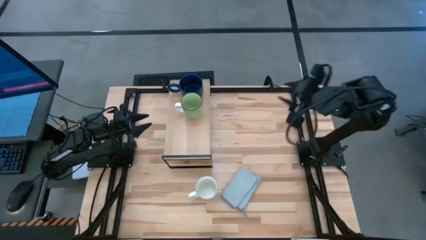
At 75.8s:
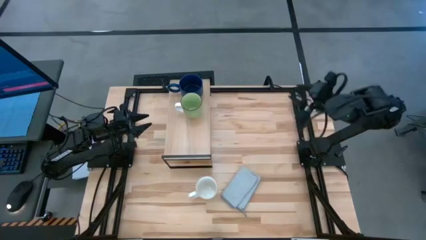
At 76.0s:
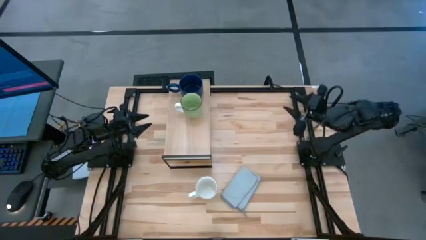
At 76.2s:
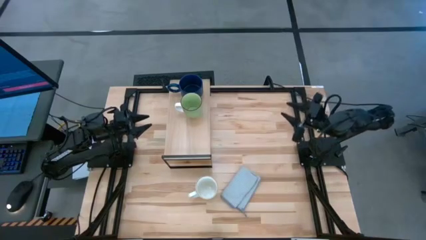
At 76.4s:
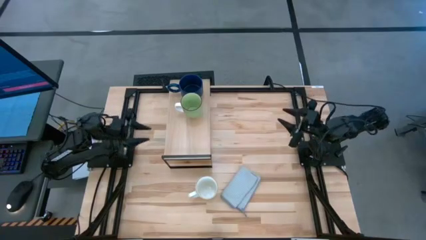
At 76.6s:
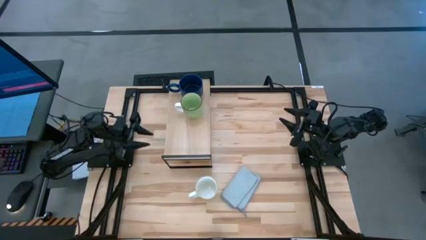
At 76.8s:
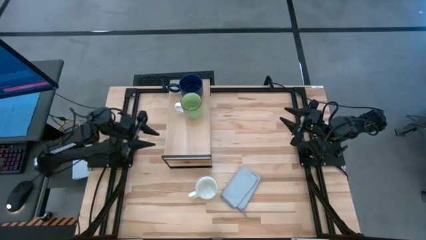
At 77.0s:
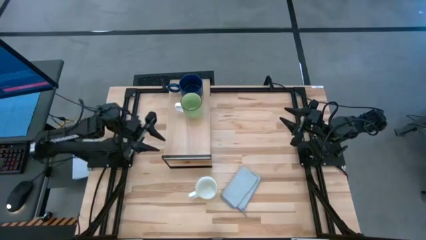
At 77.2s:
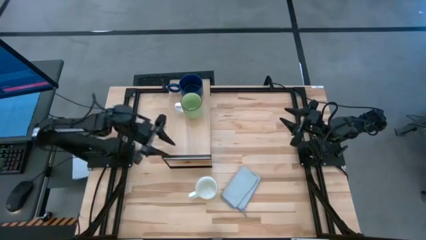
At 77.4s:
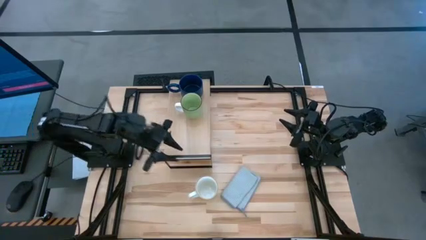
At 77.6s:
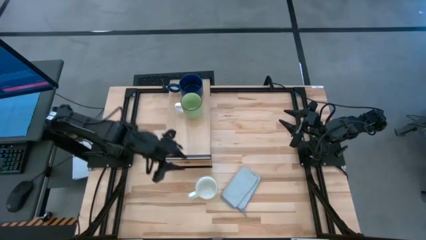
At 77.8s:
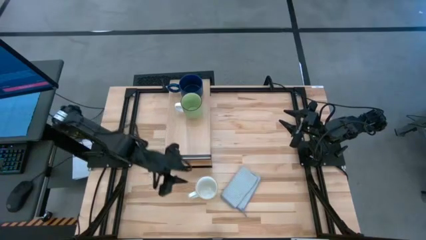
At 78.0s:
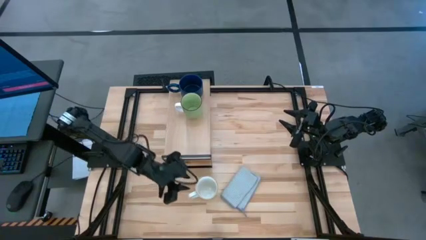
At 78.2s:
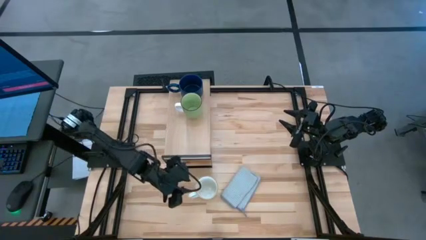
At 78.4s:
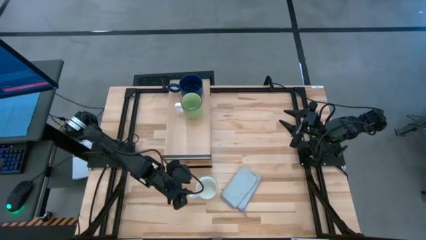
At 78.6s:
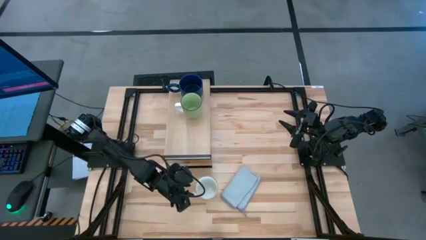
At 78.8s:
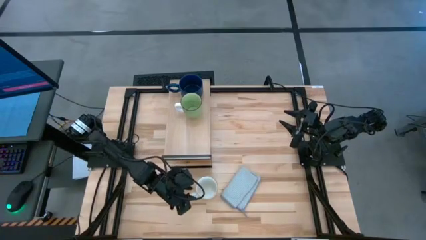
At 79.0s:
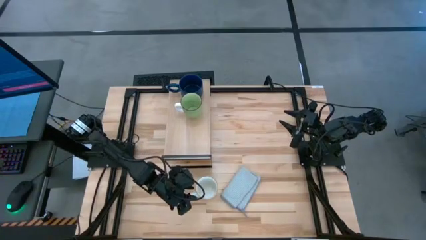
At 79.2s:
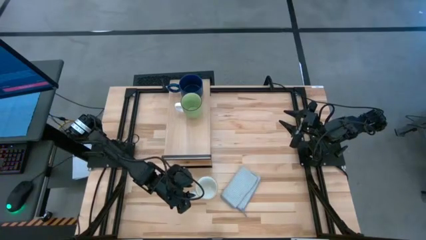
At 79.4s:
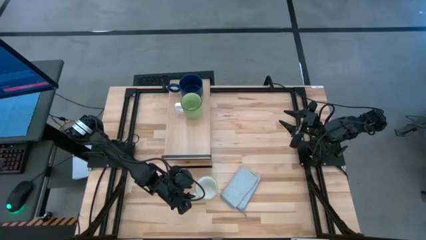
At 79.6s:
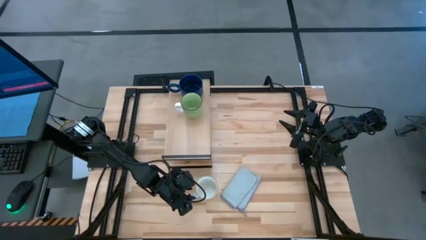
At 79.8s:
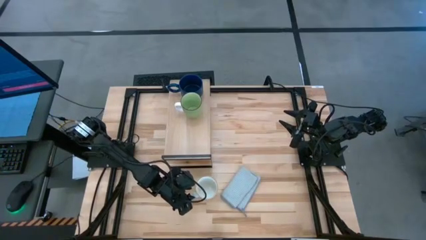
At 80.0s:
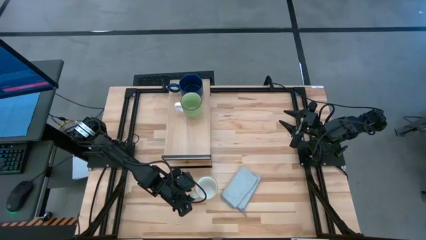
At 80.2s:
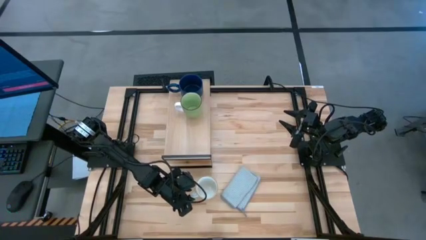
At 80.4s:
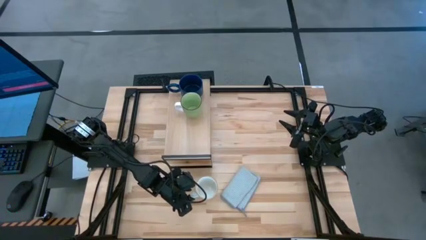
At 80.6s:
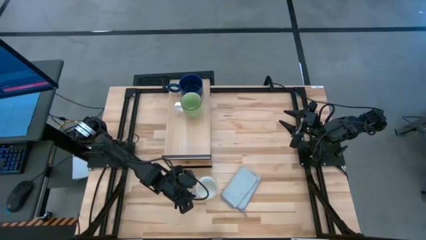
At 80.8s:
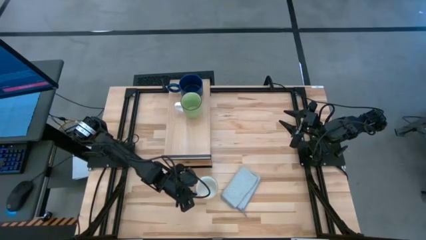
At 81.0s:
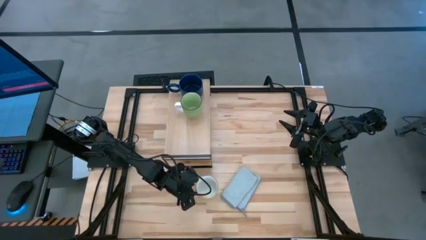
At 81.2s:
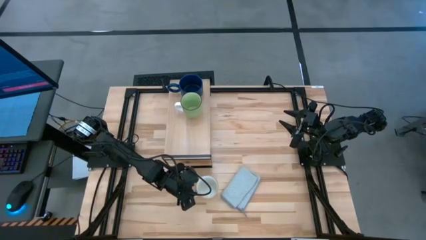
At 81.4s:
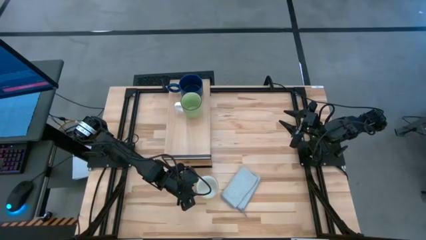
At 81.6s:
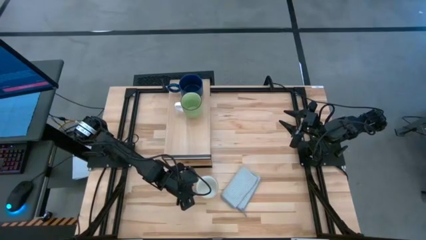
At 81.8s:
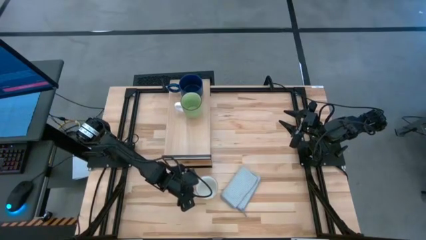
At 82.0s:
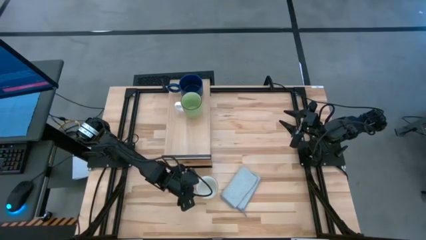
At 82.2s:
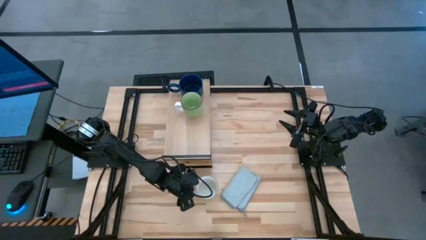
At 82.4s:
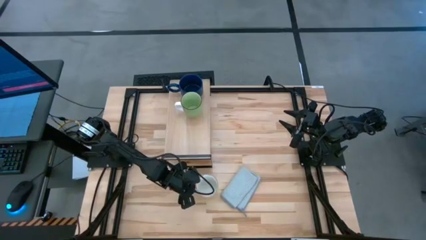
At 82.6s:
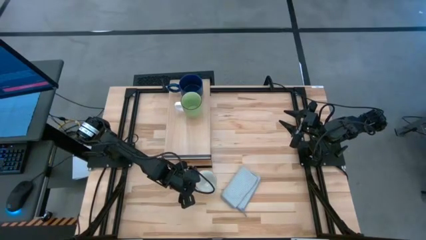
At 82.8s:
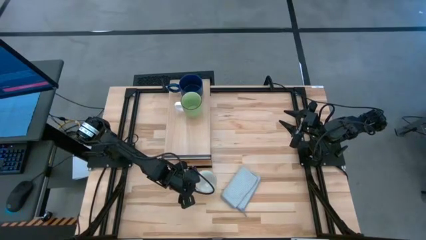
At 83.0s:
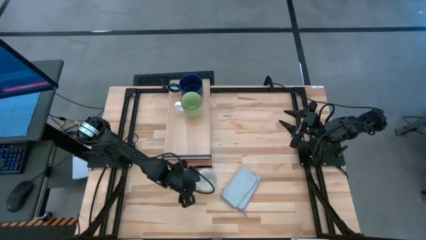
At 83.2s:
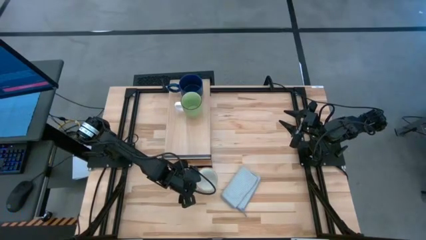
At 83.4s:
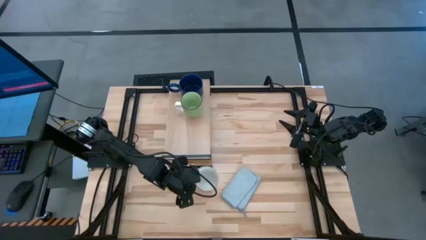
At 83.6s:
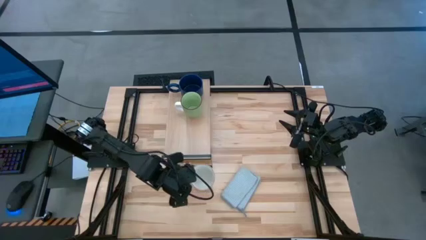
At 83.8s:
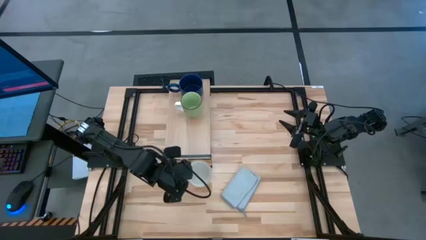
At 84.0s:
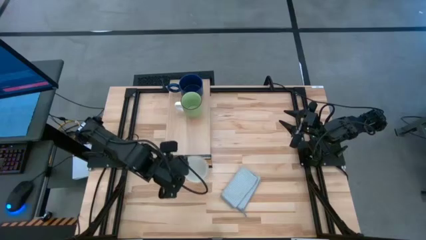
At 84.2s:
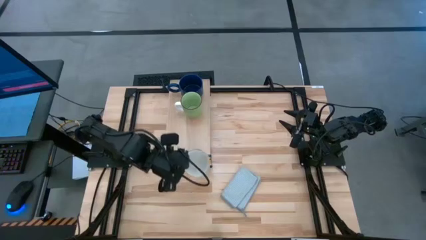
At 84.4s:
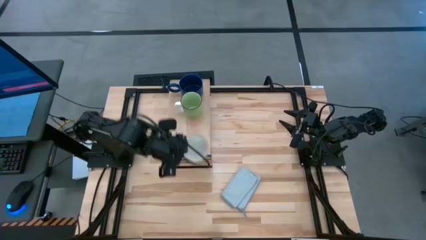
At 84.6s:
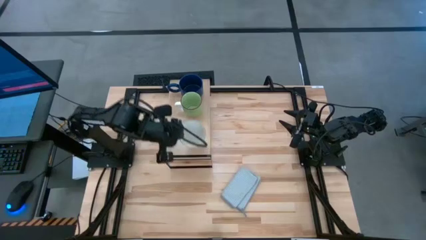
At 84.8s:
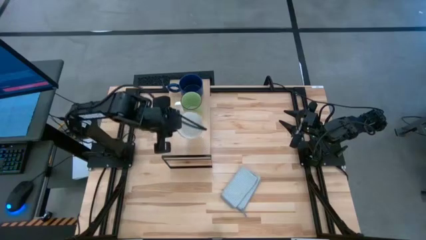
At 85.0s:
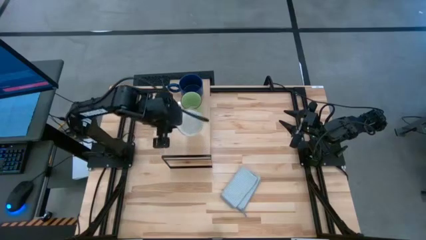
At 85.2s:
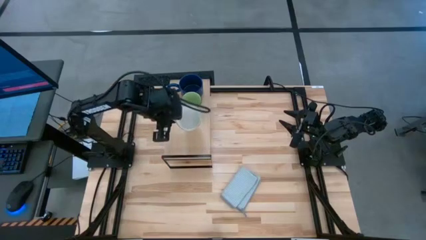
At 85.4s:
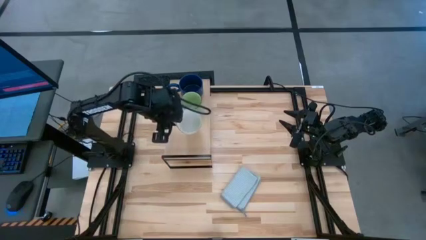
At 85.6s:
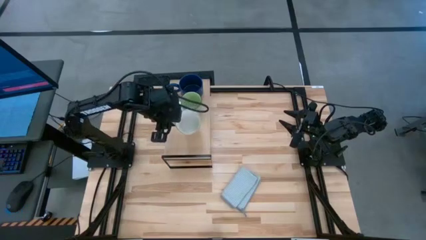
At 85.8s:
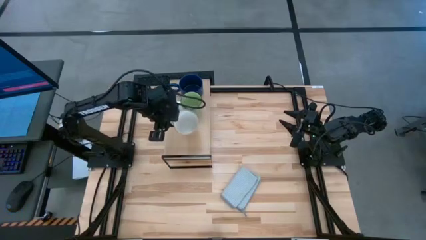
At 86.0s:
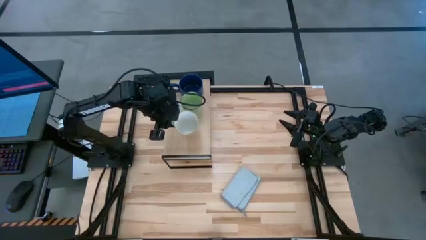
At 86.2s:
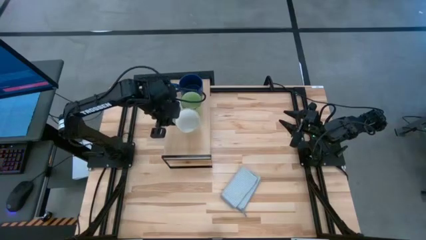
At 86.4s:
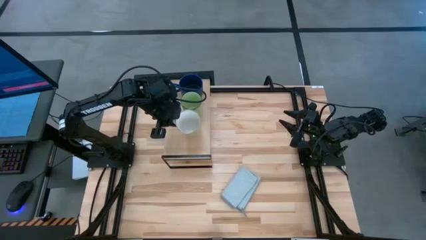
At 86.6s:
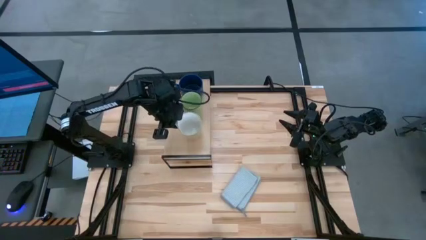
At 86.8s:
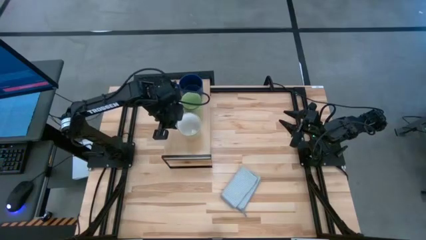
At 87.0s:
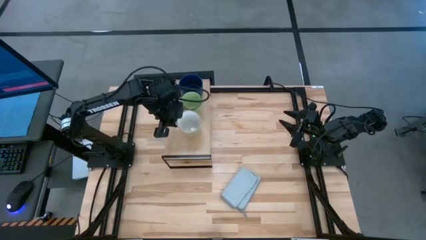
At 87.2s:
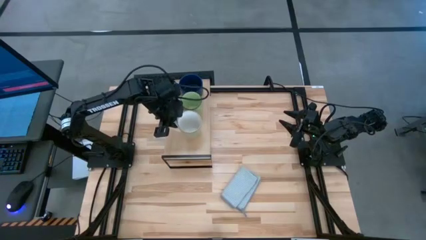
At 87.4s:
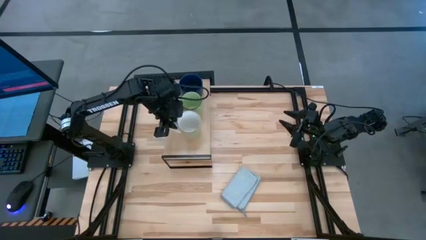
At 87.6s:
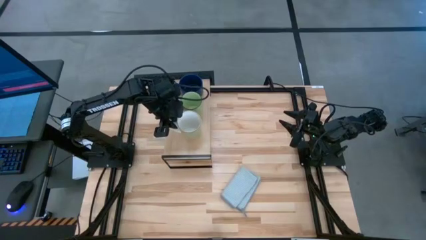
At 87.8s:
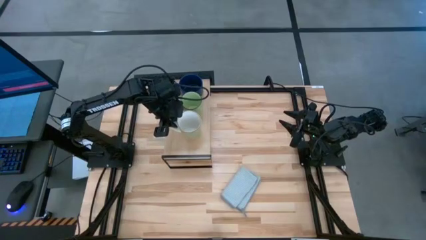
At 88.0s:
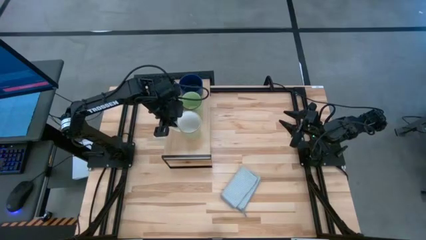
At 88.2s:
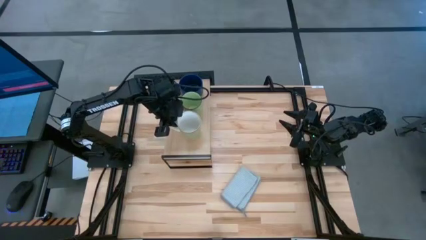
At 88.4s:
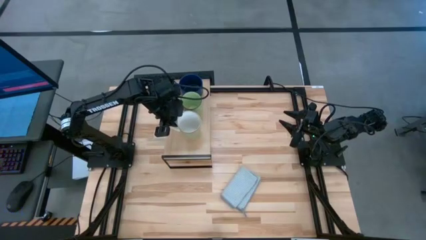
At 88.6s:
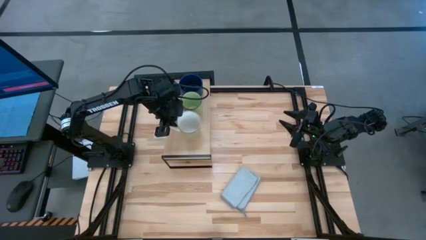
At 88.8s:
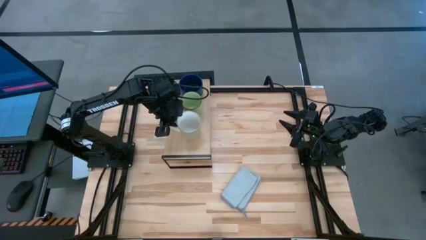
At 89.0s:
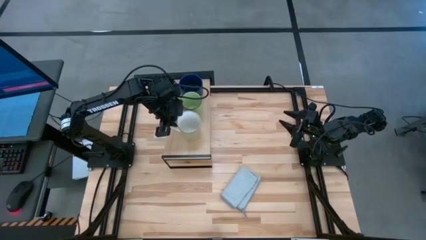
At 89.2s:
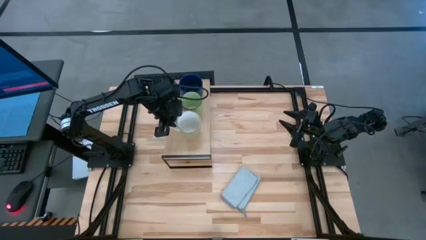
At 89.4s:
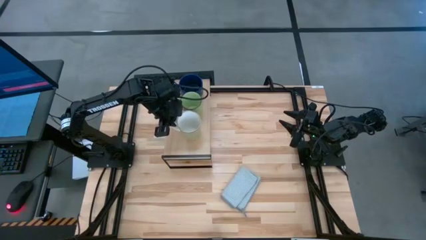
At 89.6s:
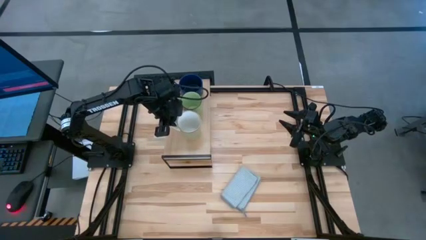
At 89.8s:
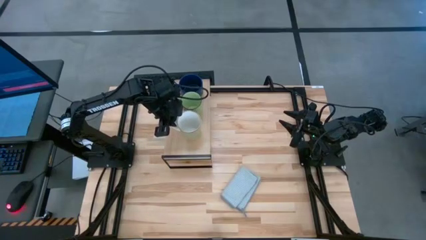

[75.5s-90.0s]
Task: Stack small to large cups/mugs on shelf
Put the white yellow mug on the shelf

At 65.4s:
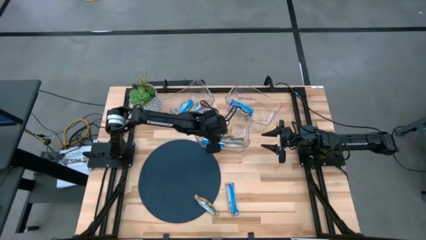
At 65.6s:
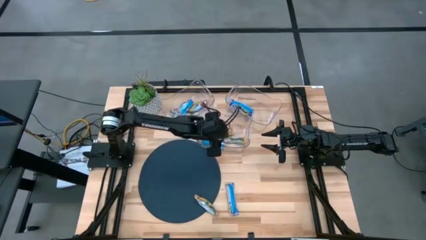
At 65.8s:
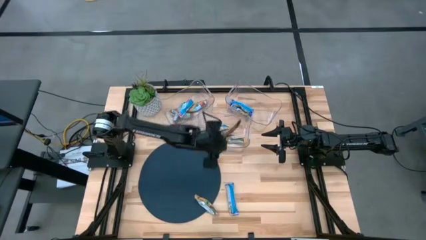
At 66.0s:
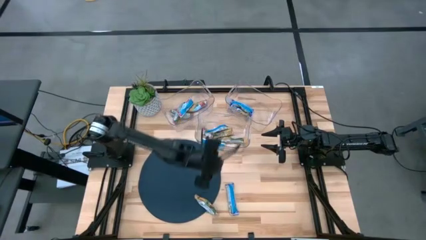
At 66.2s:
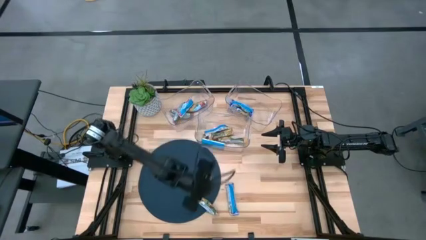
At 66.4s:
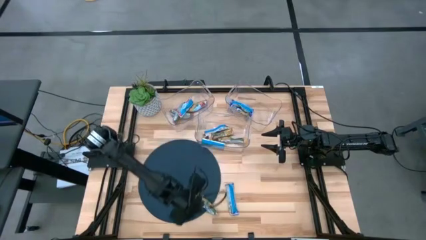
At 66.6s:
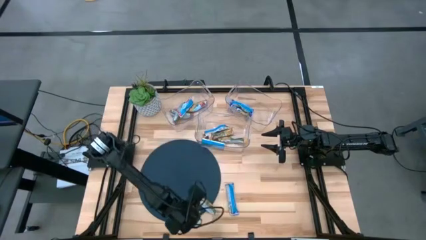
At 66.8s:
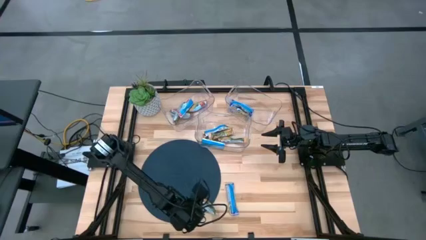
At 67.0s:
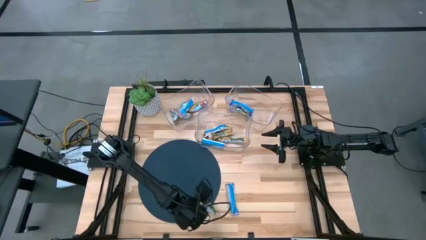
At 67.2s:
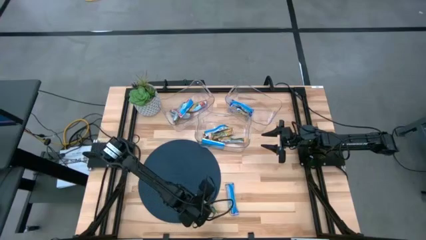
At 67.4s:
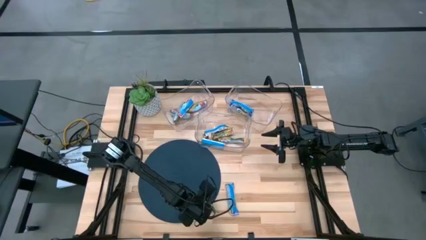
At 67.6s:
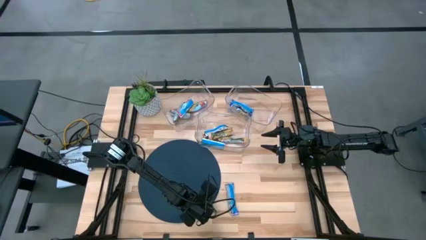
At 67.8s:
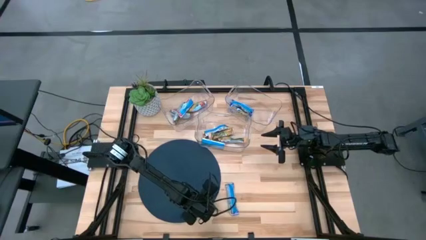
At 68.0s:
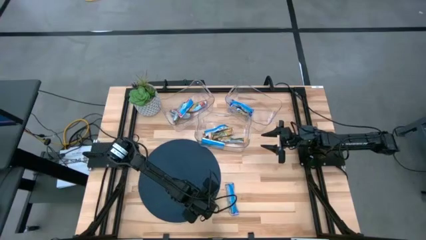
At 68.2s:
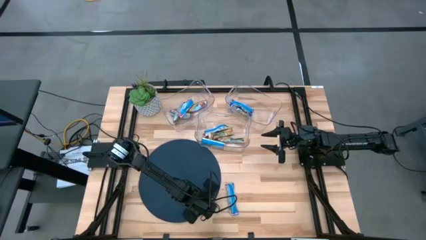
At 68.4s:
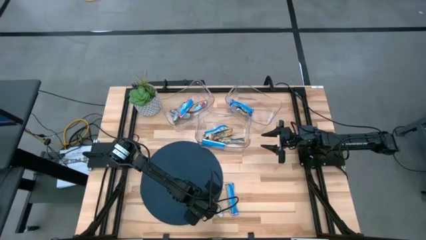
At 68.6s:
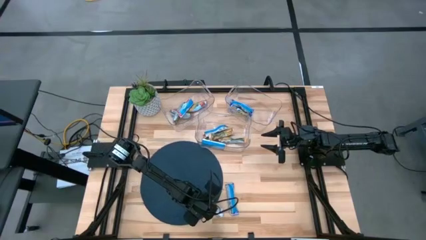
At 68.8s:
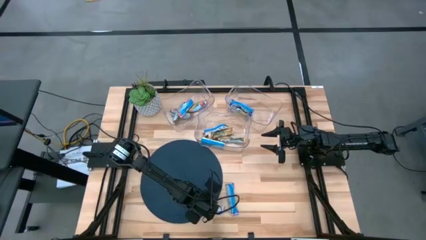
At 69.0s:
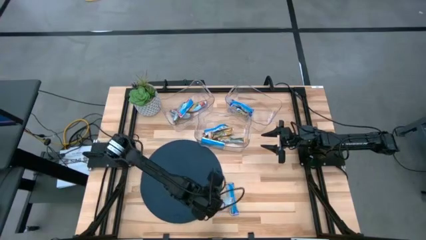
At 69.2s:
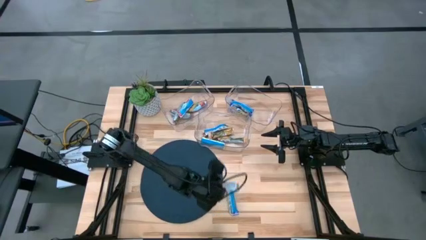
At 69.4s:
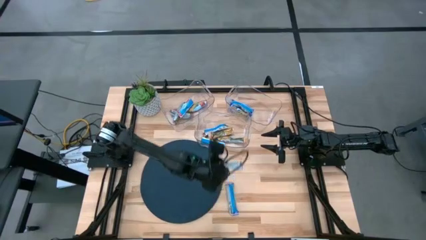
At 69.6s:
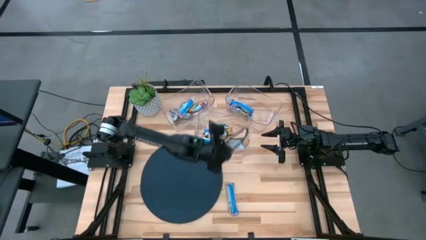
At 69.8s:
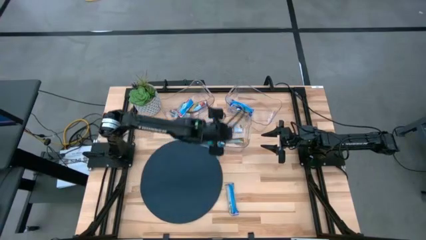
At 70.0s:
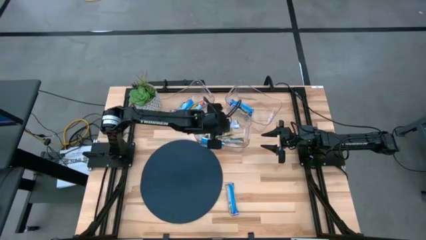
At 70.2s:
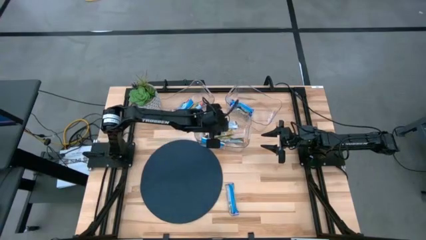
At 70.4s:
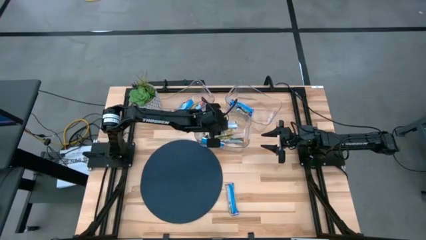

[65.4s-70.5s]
Task: Pick and place Granola Bars by type
Put the yellow granola bar into the middle transparent bin
